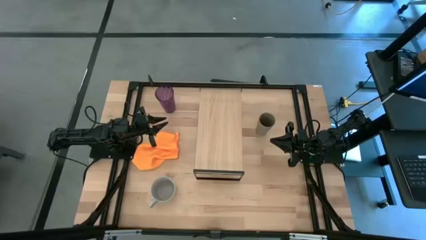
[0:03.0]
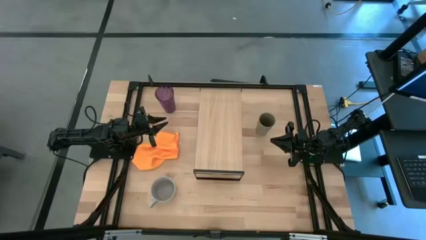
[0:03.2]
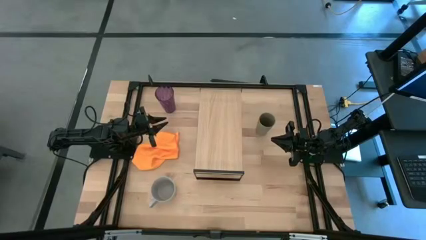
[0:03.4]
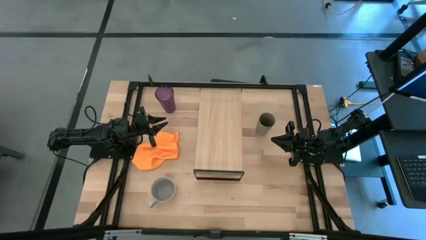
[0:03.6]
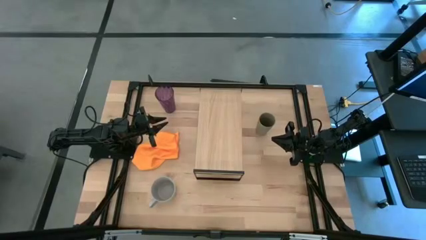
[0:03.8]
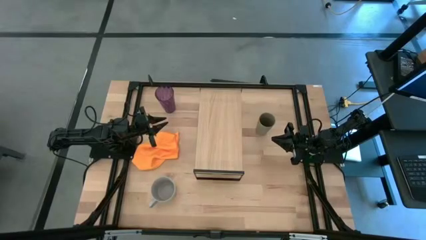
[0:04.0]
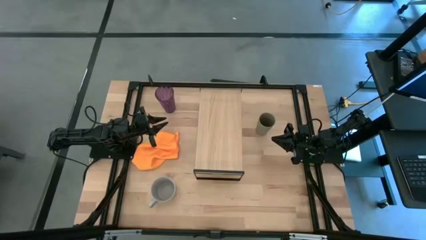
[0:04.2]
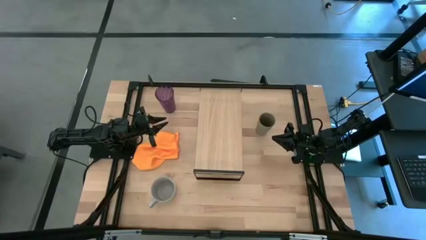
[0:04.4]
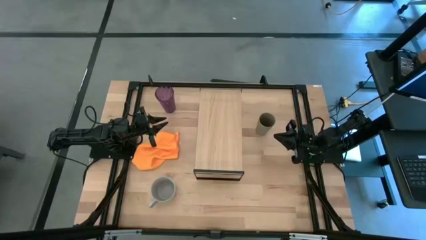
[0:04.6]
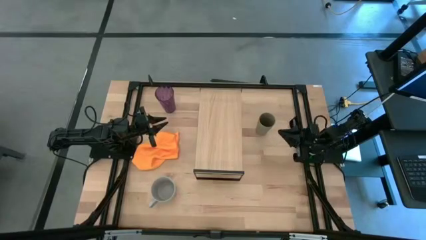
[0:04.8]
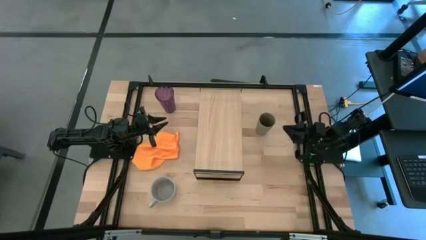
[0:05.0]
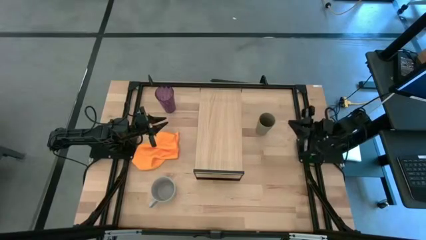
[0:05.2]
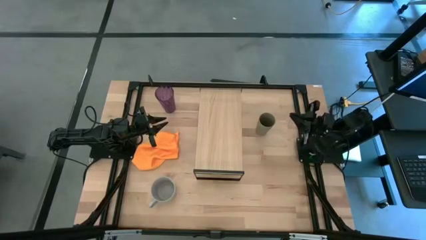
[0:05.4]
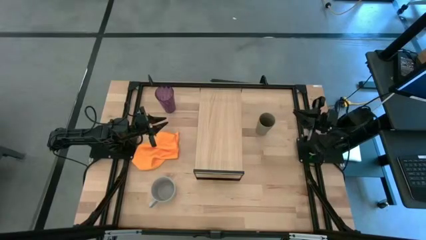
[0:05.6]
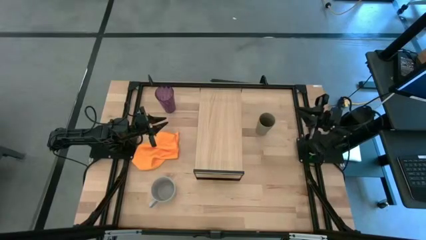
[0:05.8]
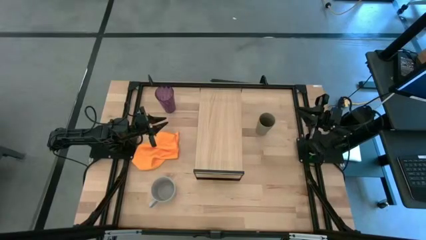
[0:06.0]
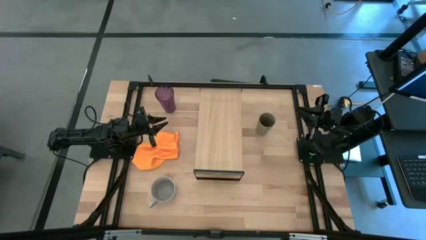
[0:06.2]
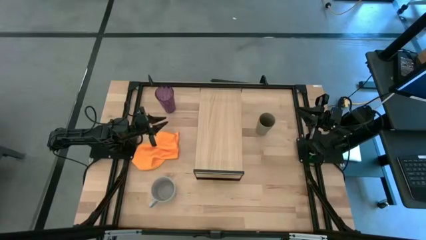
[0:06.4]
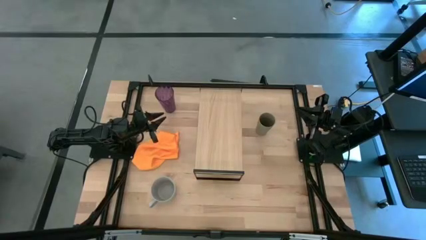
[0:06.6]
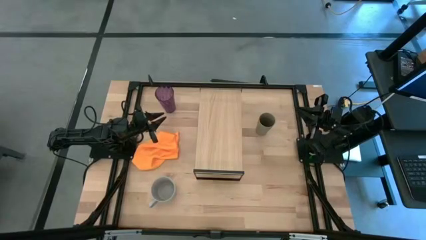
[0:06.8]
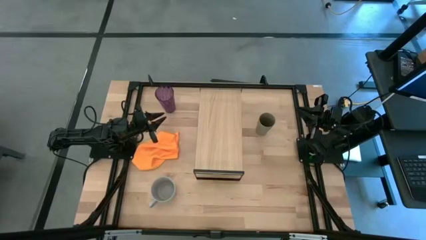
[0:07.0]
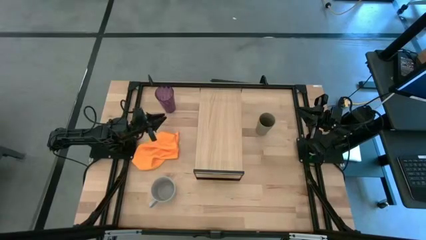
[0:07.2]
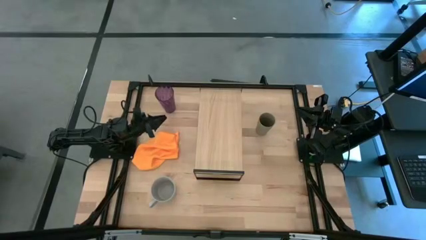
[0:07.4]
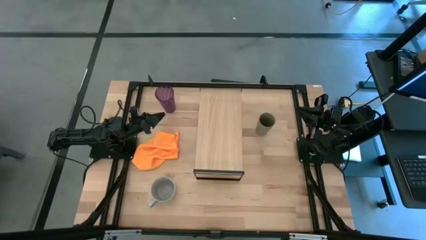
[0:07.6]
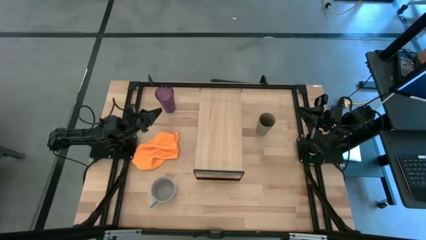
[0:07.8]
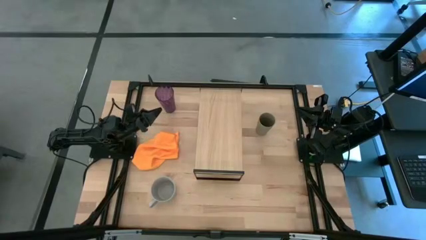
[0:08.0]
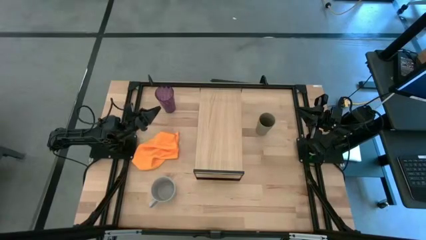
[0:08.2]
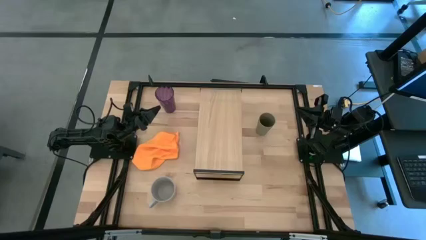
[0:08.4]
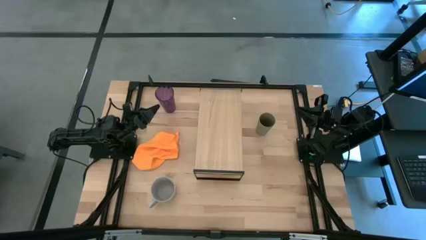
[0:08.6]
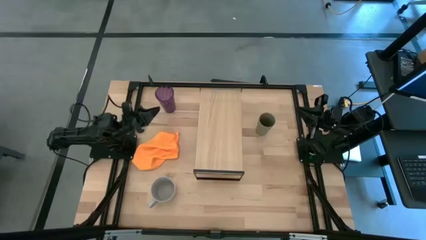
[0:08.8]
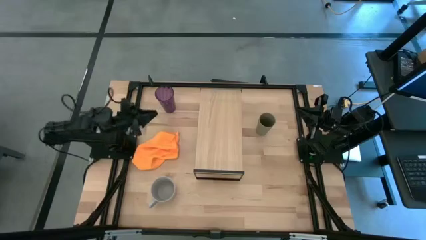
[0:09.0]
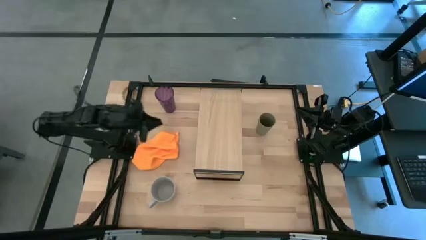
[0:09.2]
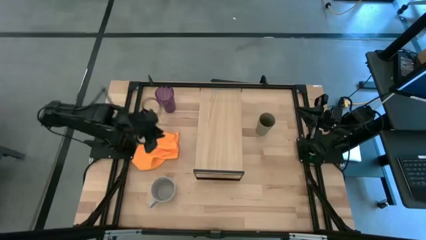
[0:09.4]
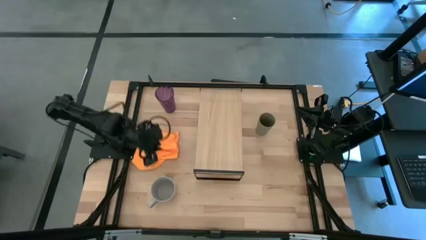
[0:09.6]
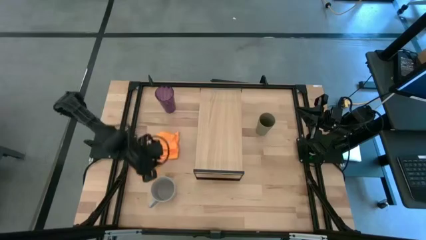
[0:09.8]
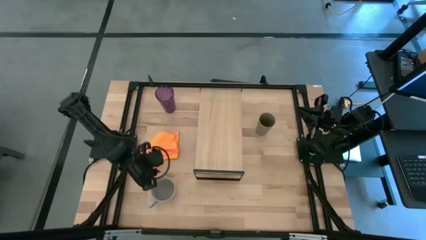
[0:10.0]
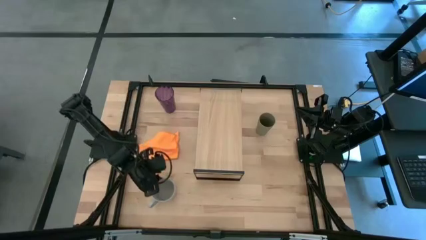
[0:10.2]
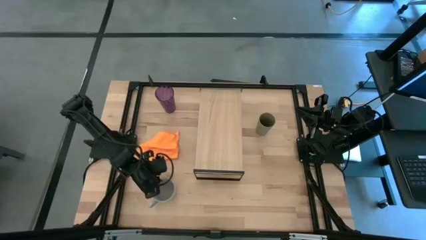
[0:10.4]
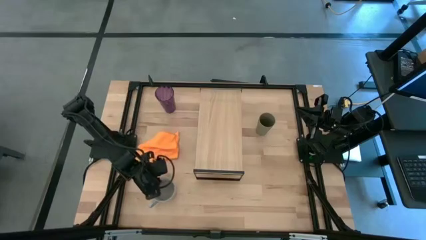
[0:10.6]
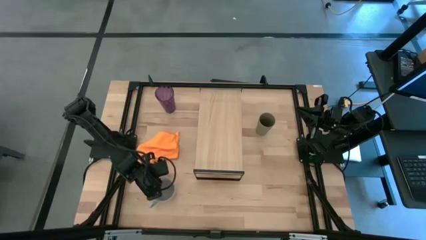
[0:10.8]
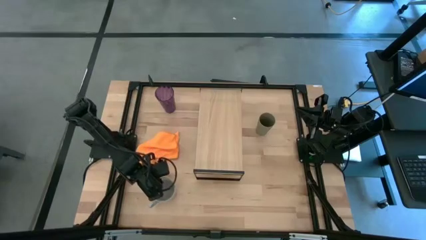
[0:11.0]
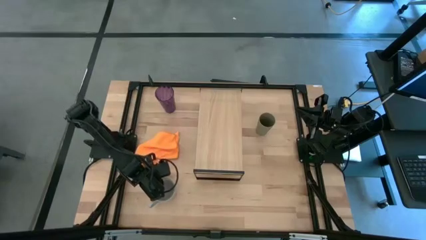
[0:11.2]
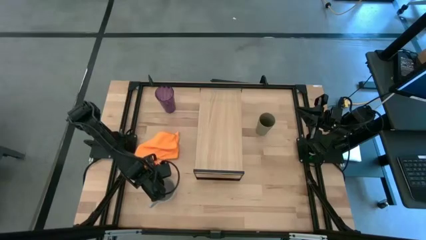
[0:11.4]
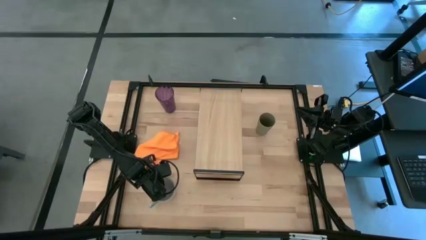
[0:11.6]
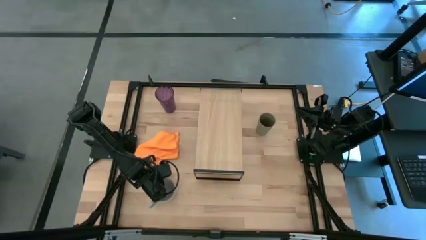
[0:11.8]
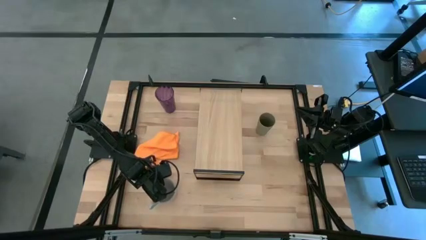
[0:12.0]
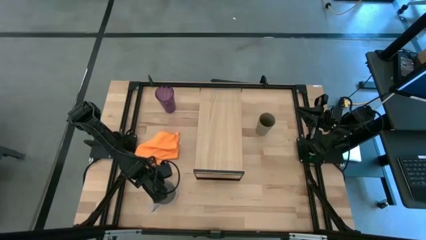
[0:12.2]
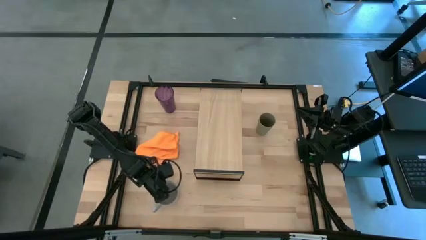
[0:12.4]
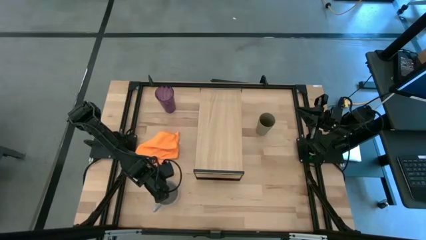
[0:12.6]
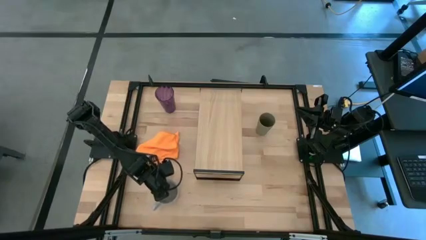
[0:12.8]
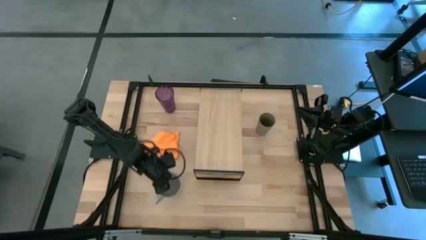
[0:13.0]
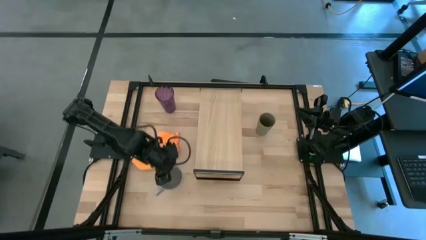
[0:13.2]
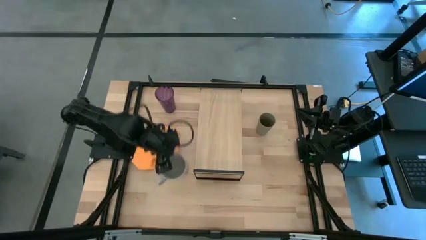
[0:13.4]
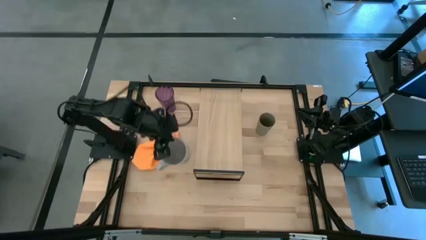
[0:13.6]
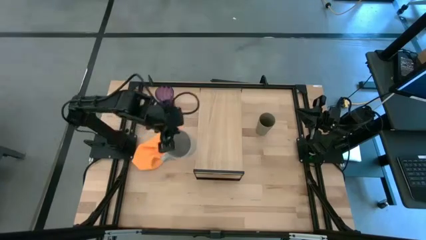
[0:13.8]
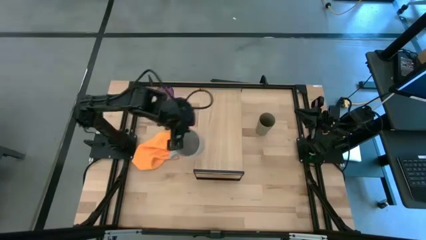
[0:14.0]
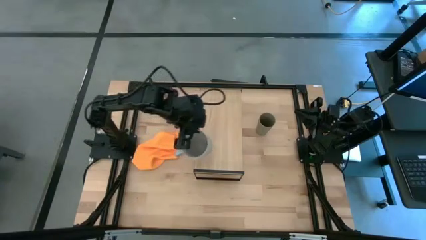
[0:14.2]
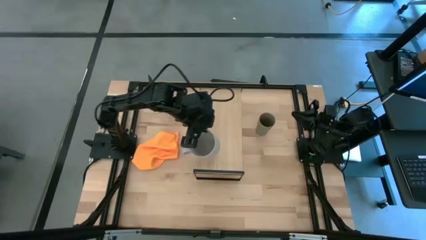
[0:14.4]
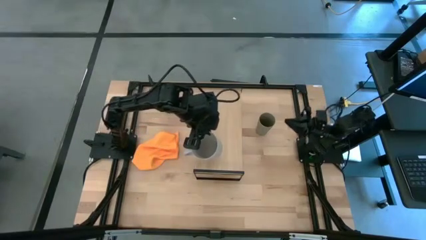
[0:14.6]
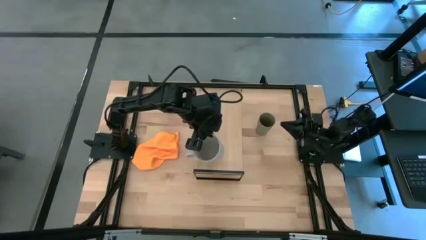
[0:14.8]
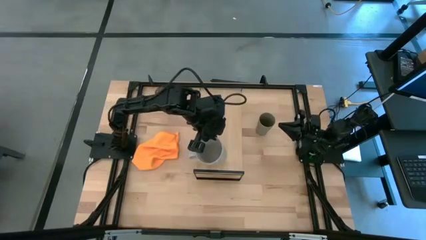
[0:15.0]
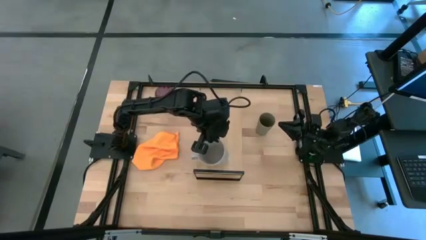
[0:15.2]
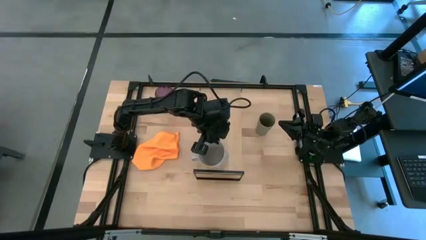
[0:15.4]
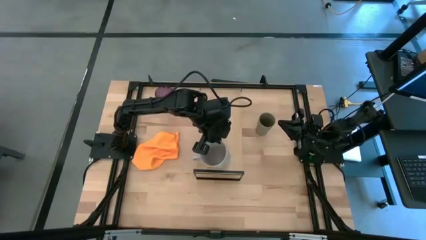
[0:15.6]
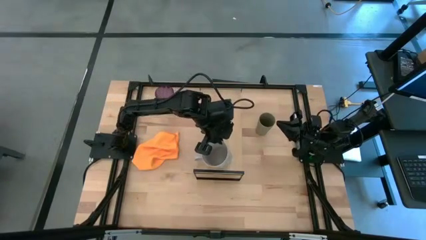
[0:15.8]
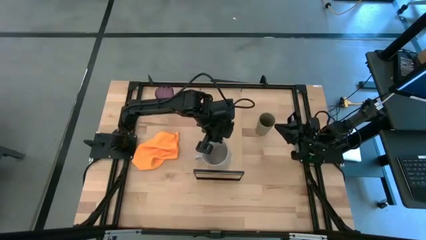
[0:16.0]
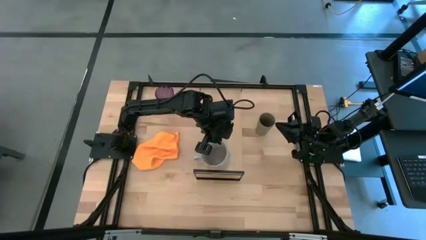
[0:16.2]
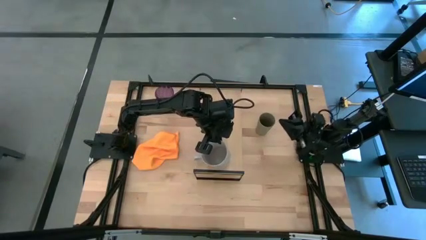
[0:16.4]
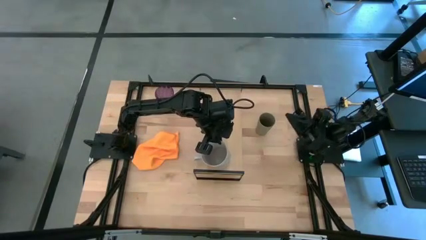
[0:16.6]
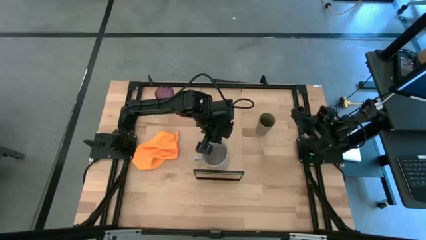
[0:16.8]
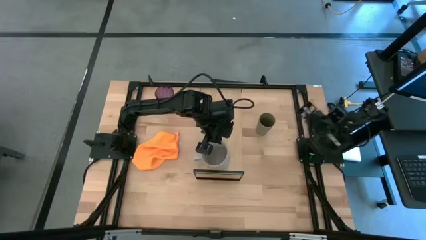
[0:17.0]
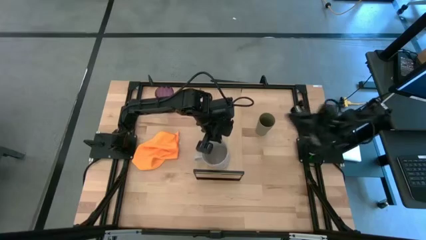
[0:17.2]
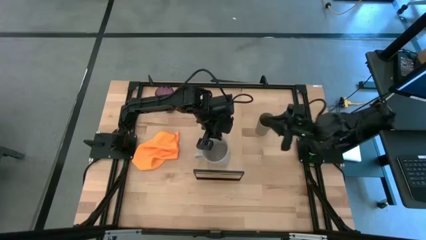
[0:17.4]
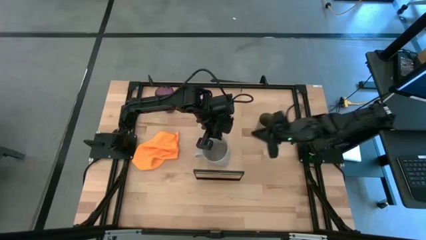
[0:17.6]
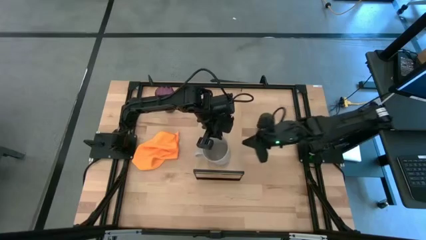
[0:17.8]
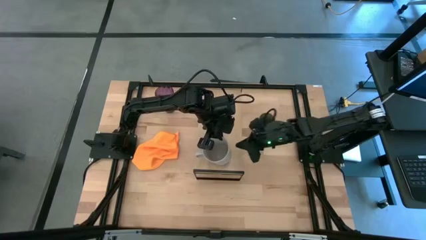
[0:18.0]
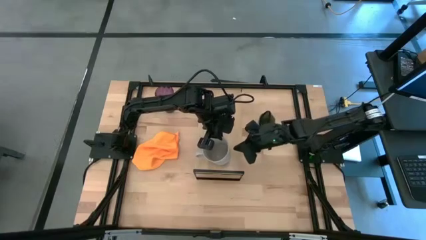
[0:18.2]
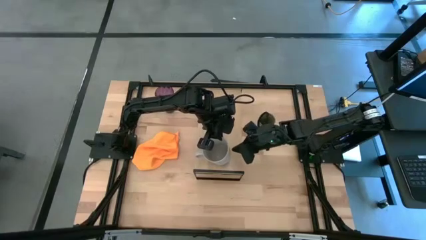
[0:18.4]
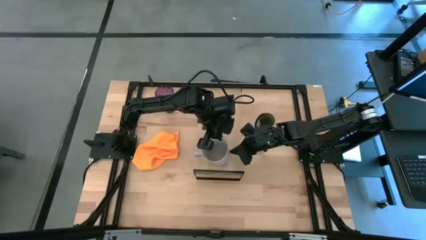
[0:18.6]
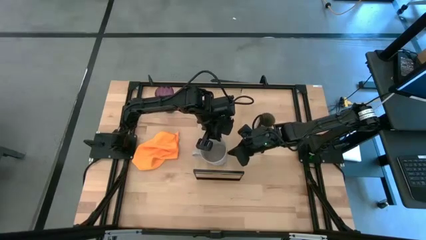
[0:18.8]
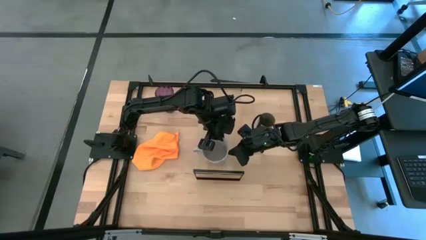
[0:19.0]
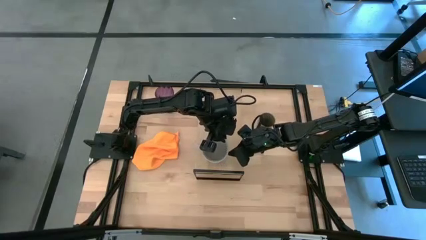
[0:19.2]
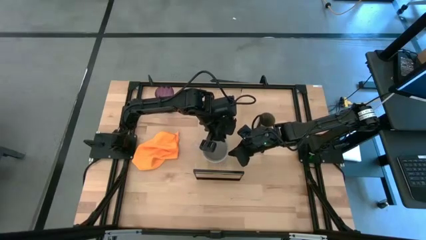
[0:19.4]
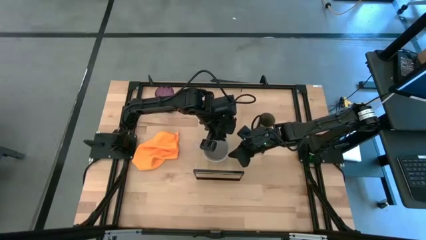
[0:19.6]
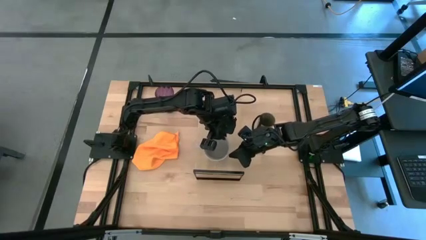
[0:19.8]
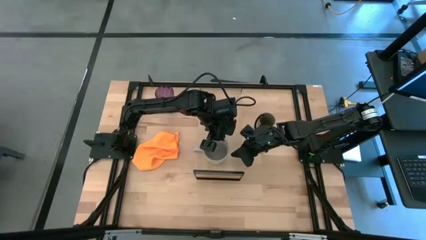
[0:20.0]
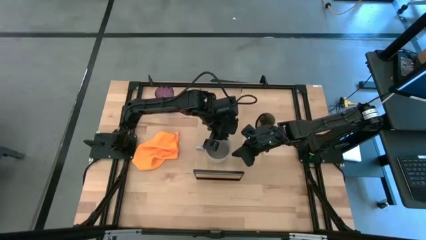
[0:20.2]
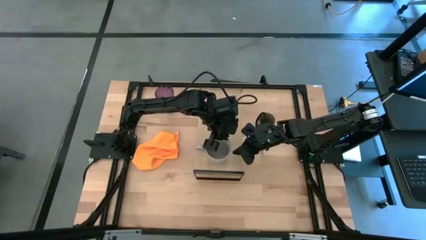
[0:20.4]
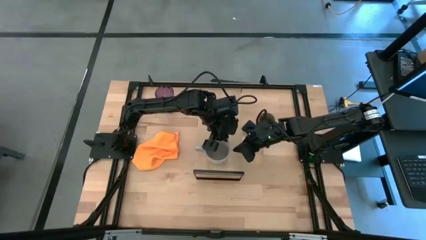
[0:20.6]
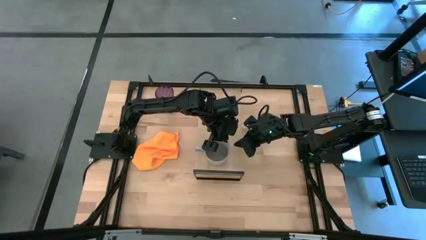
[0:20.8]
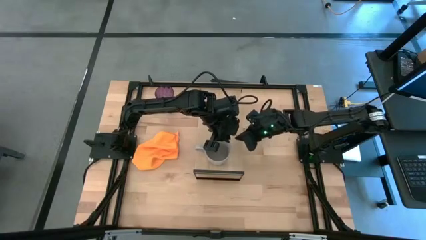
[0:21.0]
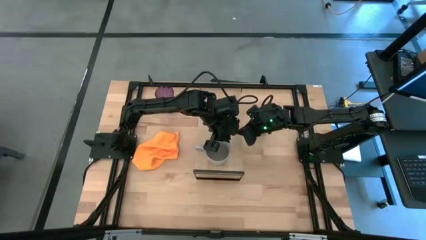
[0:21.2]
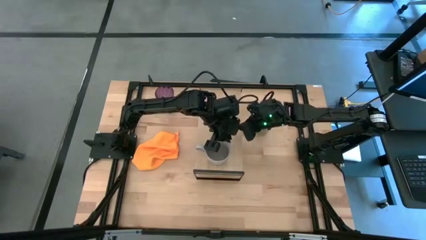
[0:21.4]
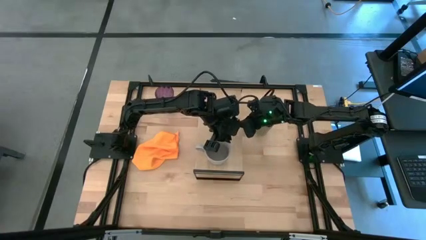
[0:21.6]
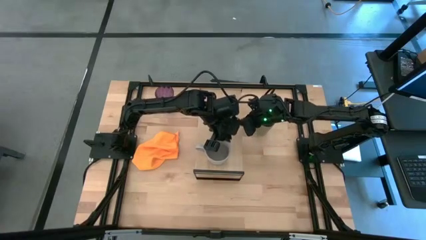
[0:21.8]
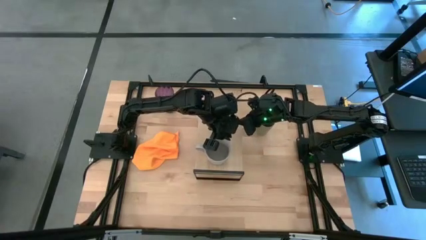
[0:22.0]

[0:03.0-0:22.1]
Task: Stack small to large cups/mugs on shelf
Put the gray mug on the shelf
